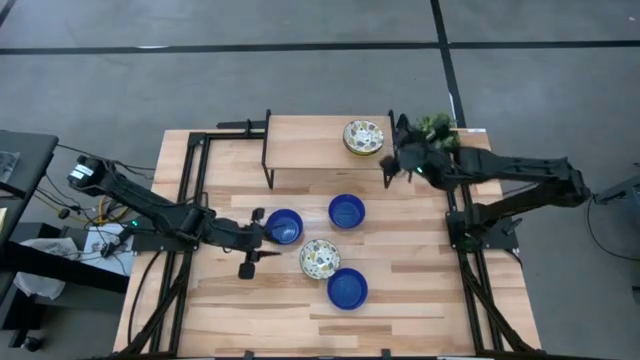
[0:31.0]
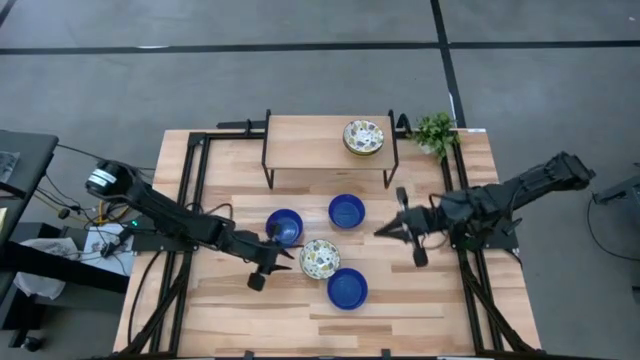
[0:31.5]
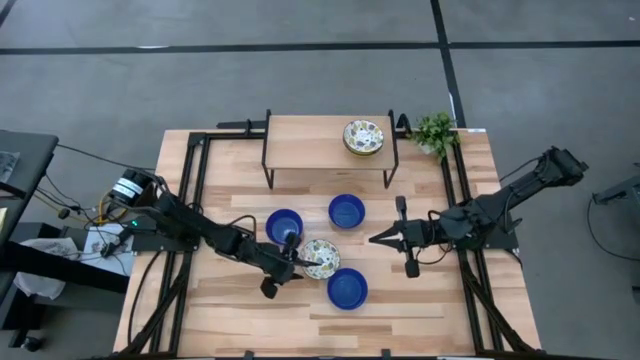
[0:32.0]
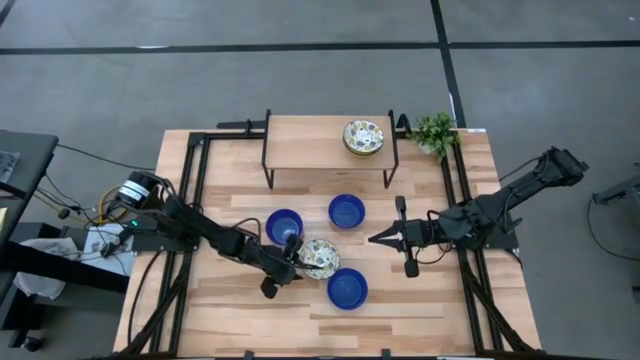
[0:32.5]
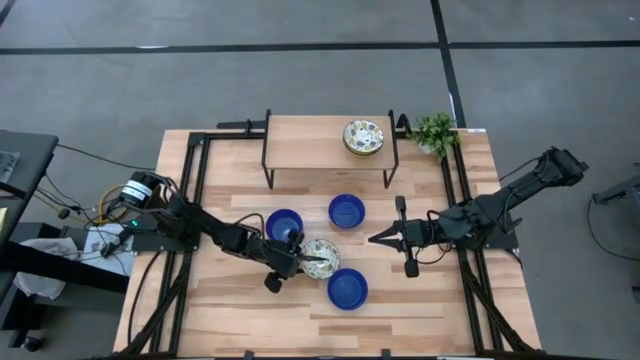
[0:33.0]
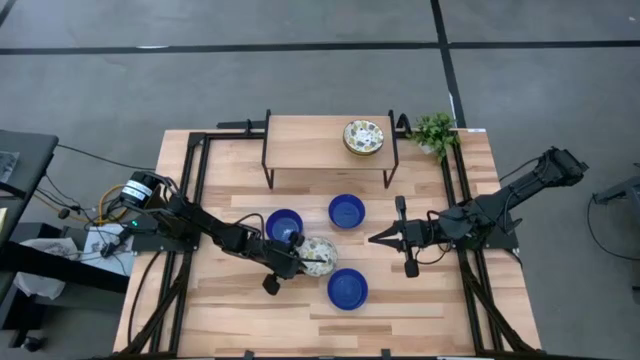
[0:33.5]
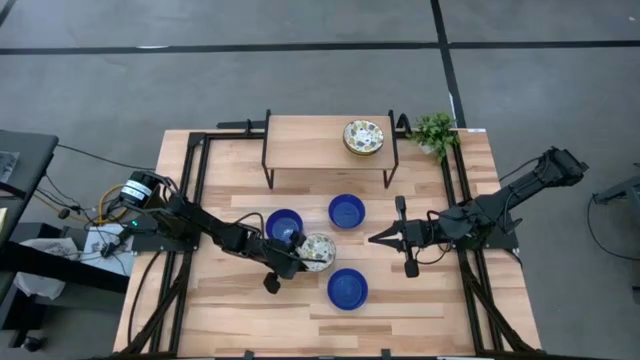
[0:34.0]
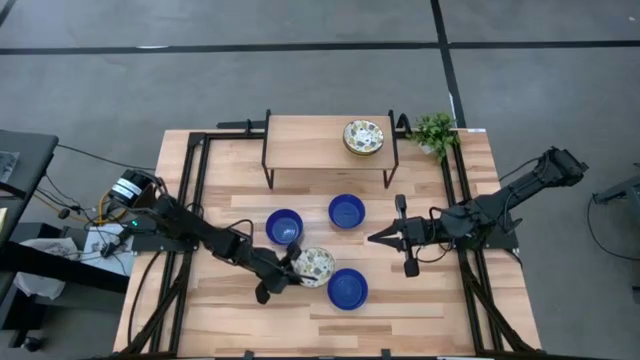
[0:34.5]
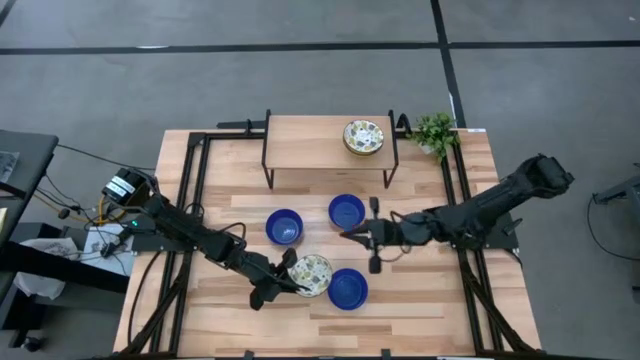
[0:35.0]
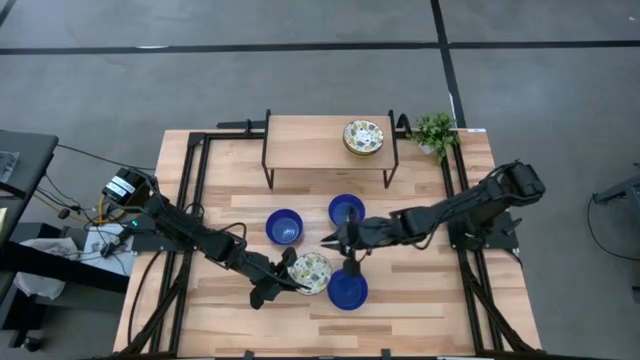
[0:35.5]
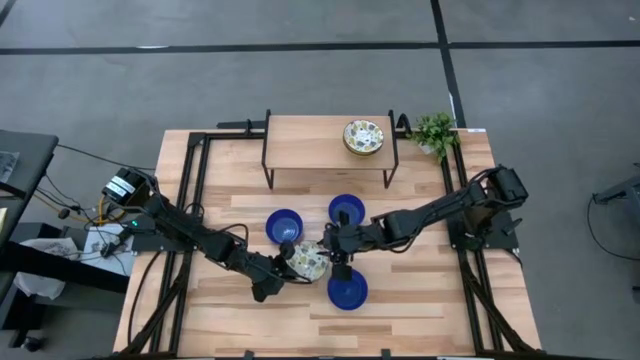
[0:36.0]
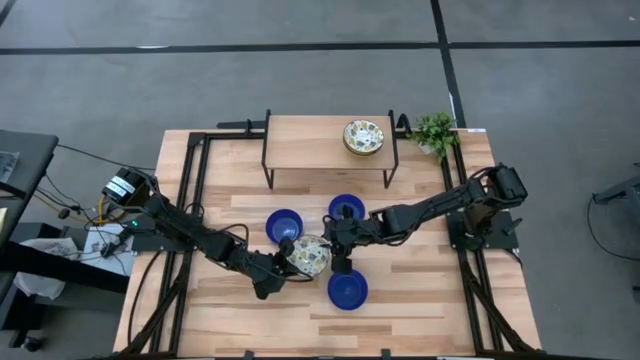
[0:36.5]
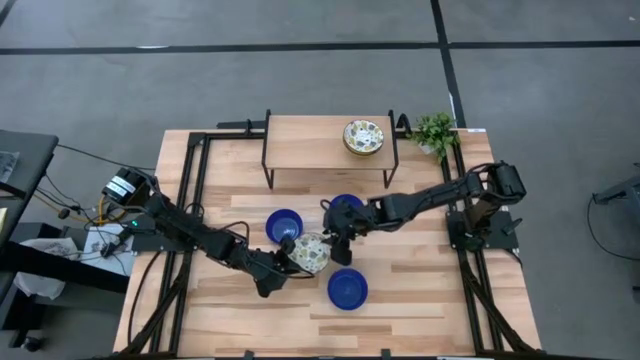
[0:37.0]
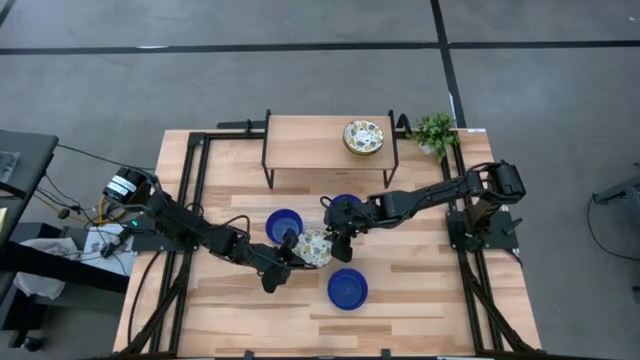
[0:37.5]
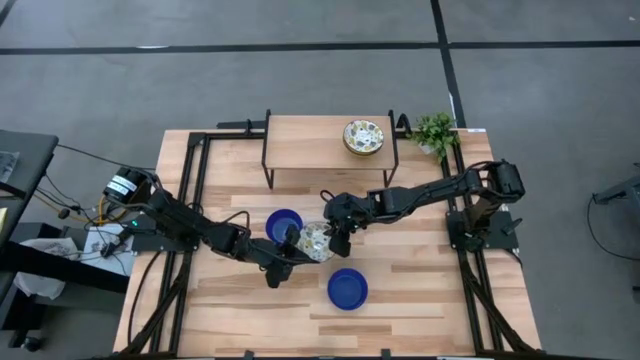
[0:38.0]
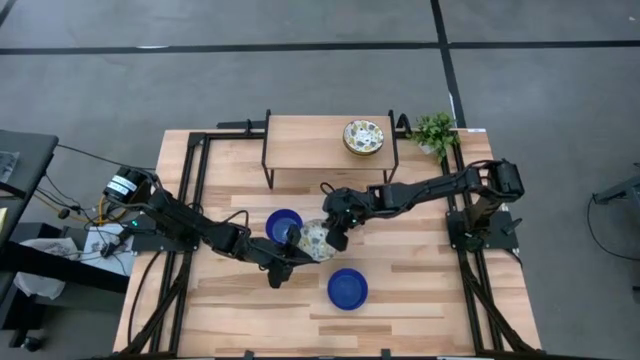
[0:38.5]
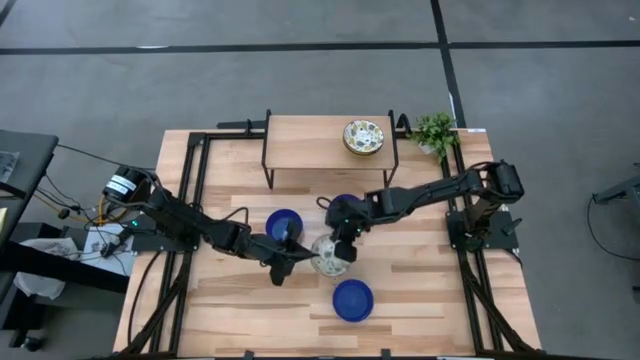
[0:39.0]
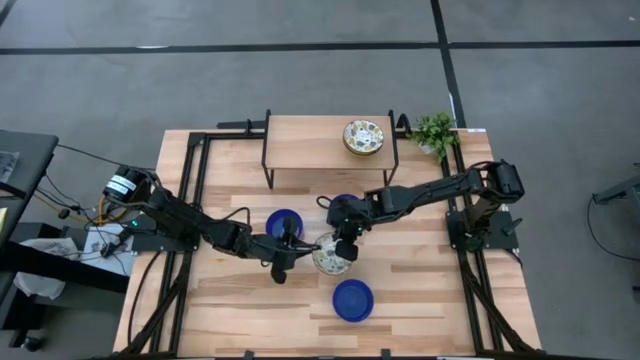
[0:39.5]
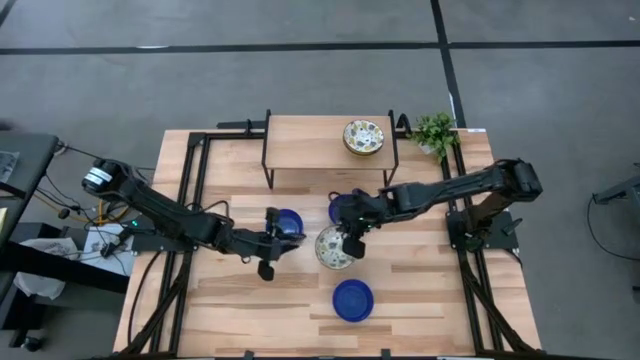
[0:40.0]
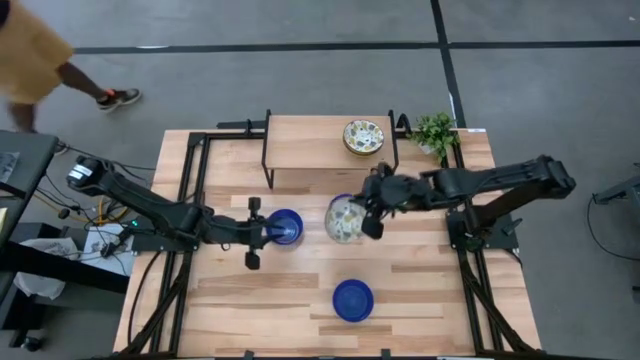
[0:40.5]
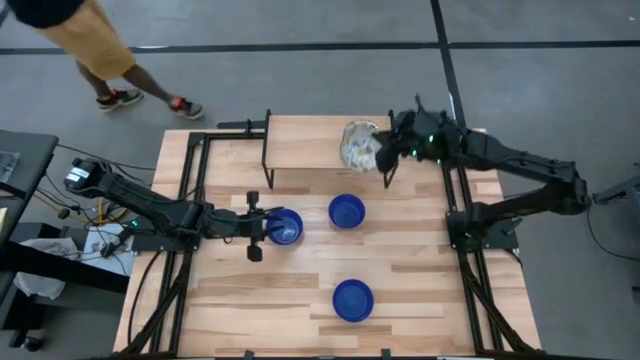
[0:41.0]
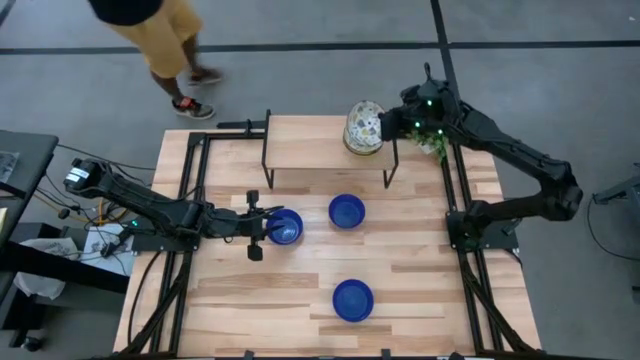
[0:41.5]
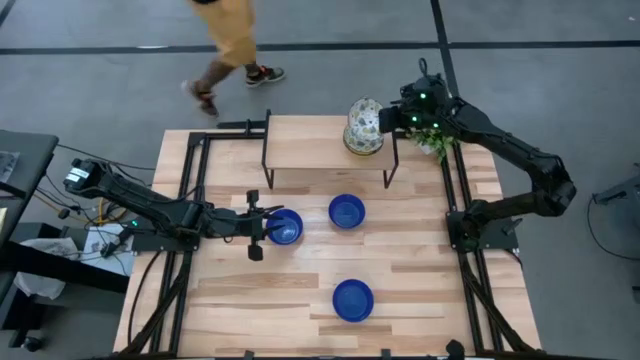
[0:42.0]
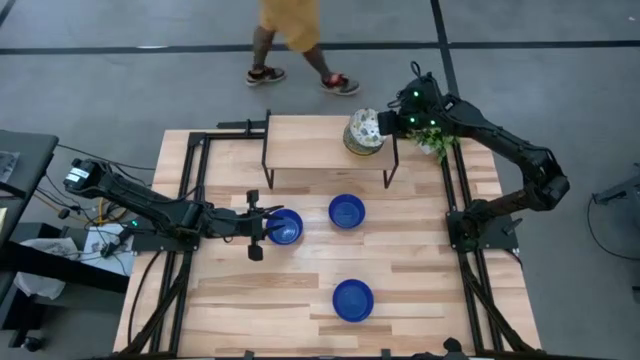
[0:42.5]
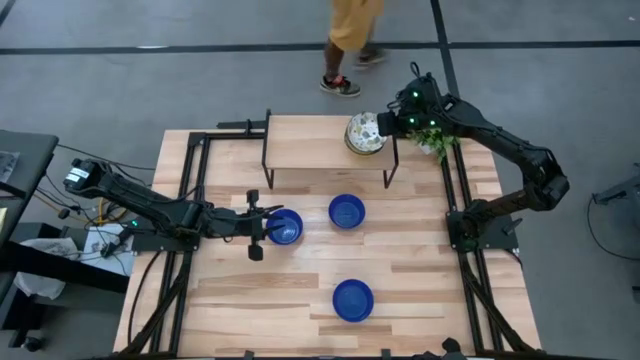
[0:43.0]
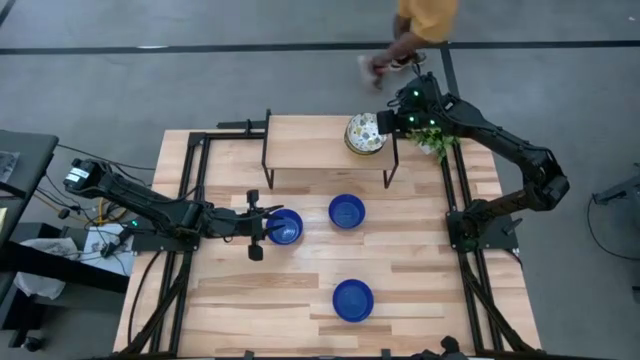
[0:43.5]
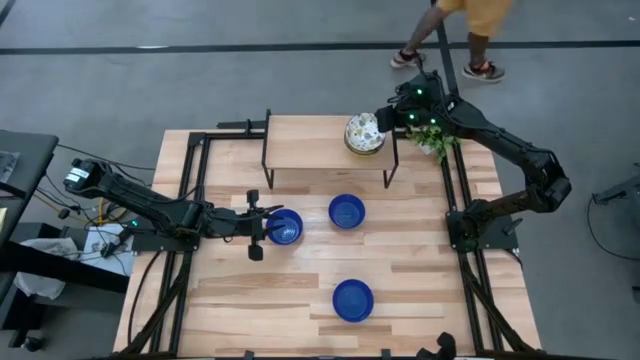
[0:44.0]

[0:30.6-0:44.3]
Task: Pick & Place Mini bowls
Stack the white patterned bowl on top of the white patterned bowl on the shelf

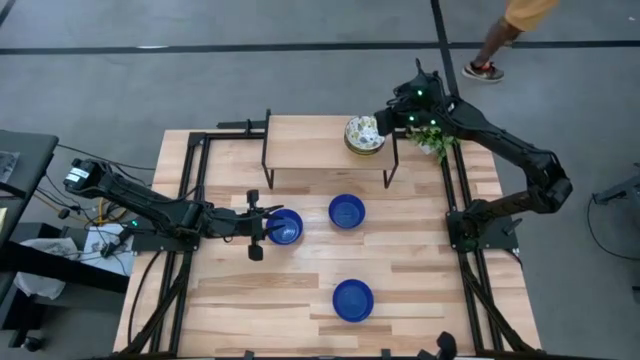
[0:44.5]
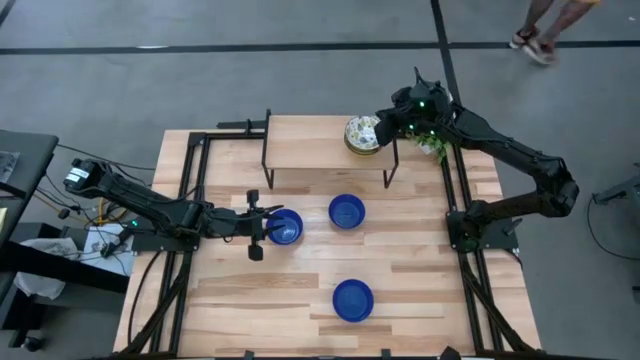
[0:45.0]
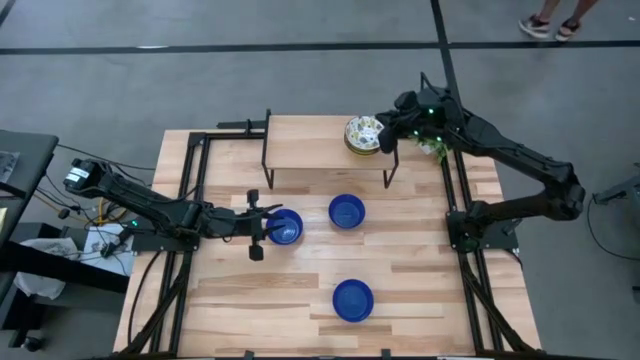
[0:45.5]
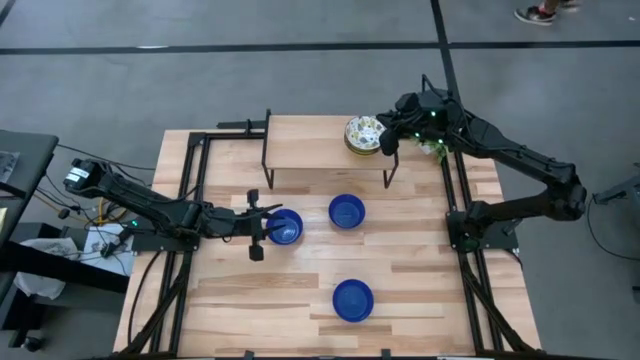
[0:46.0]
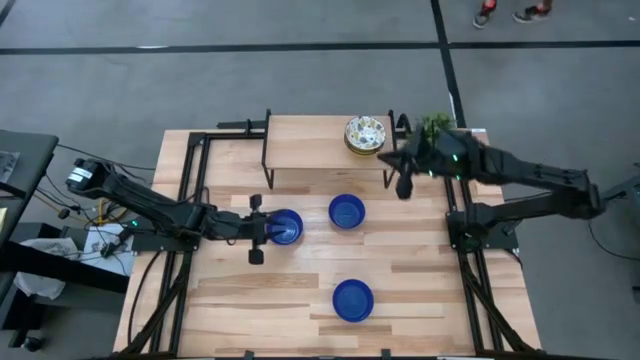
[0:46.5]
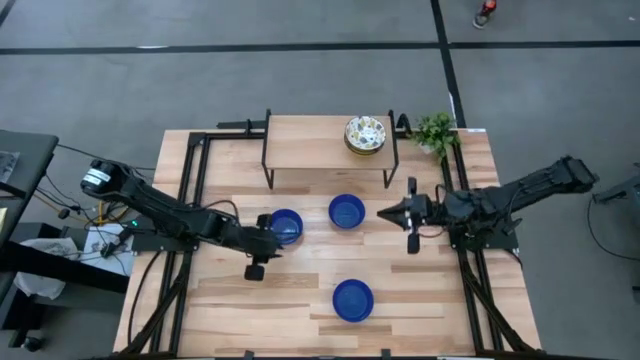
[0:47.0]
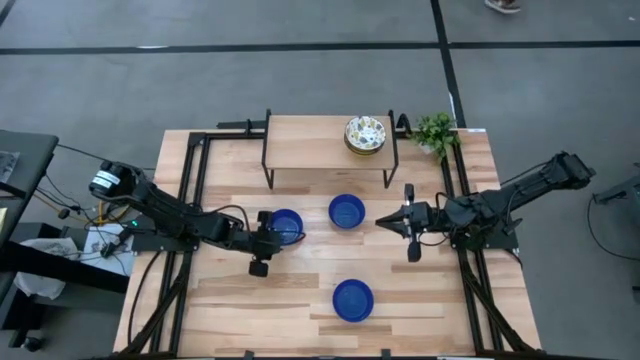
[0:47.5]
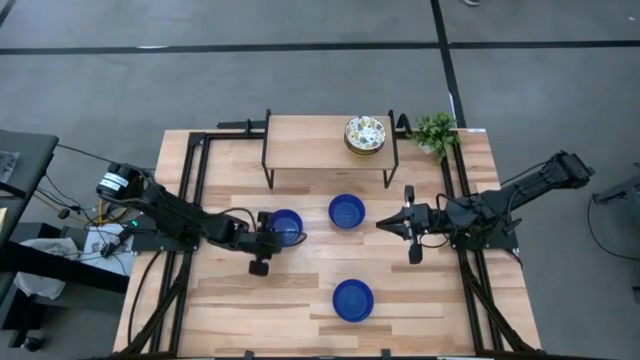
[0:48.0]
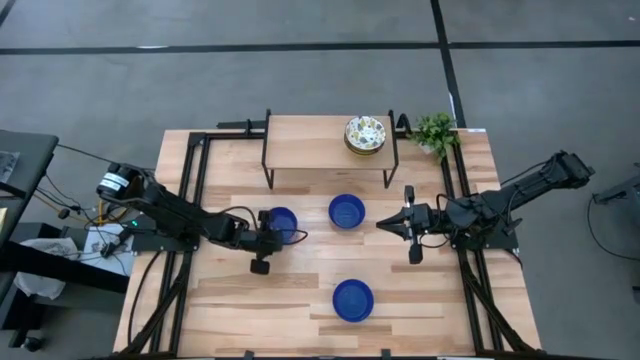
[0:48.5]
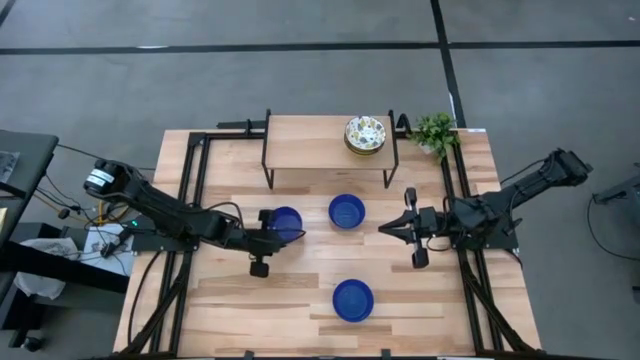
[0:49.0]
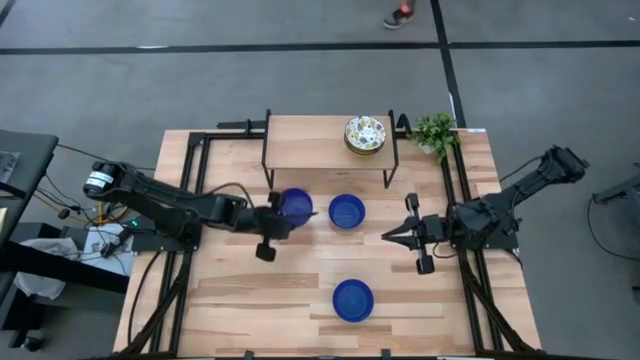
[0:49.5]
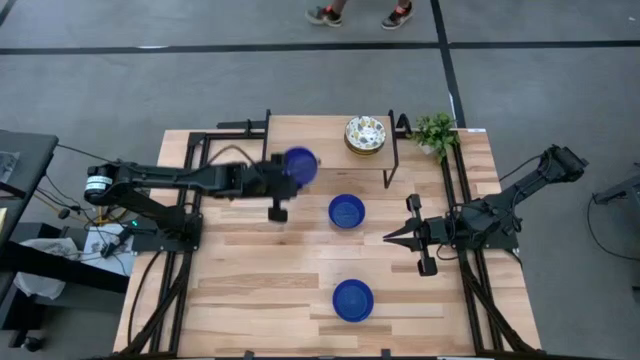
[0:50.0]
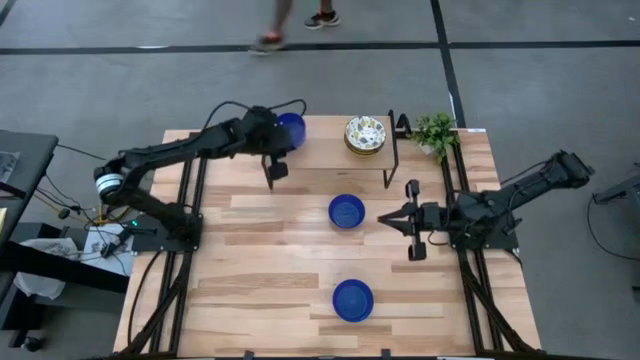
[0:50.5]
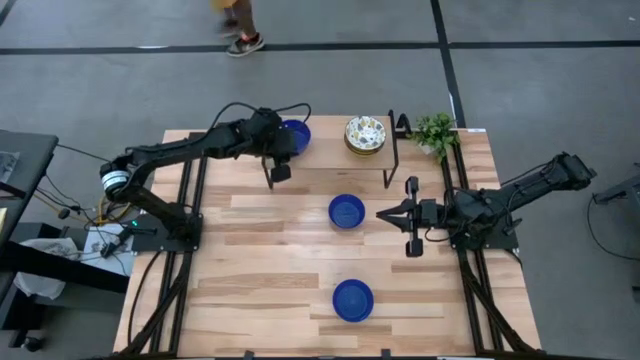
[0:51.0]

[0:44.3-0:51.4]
Put the top left blue bowl on the shelf
